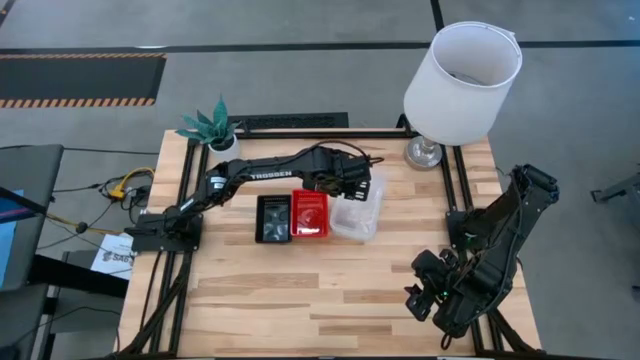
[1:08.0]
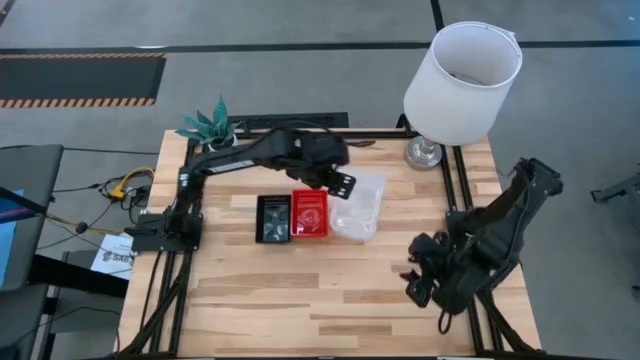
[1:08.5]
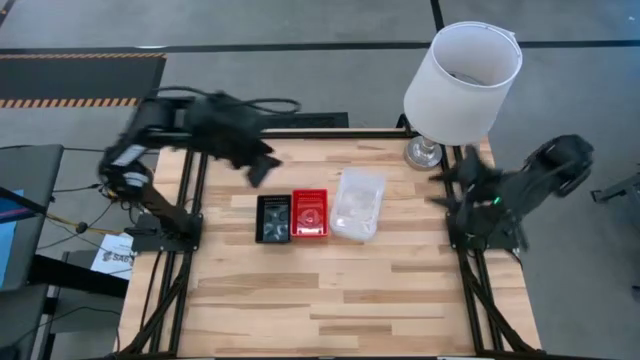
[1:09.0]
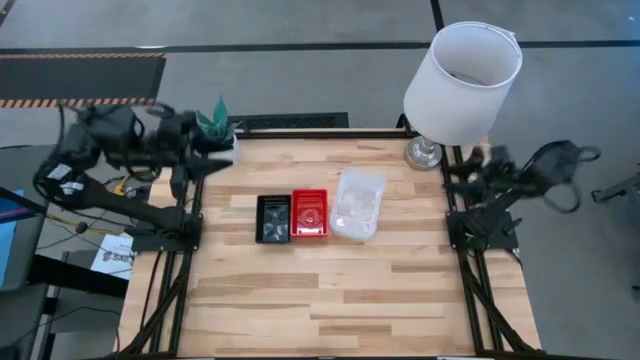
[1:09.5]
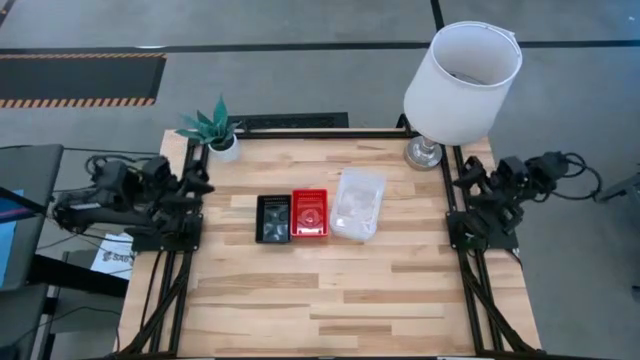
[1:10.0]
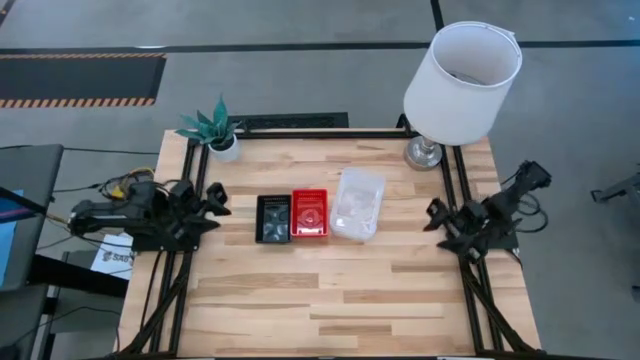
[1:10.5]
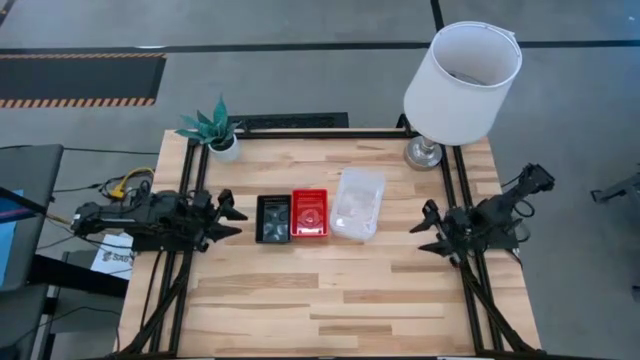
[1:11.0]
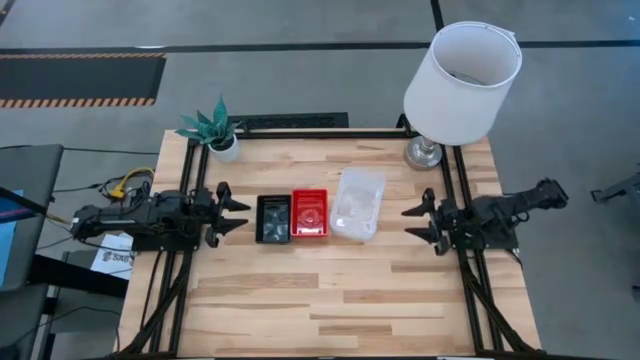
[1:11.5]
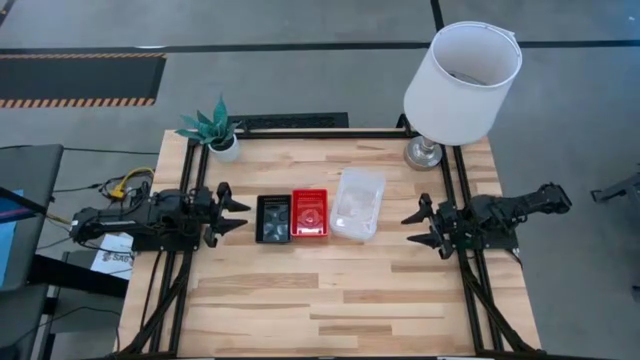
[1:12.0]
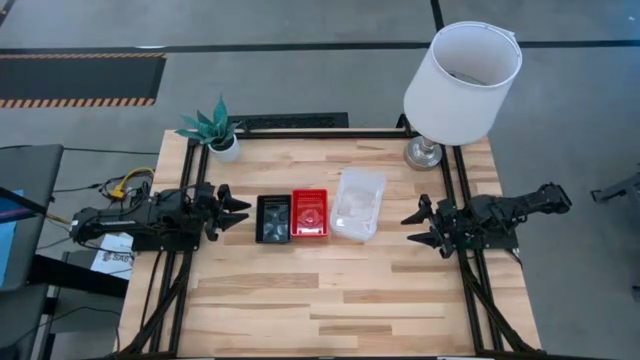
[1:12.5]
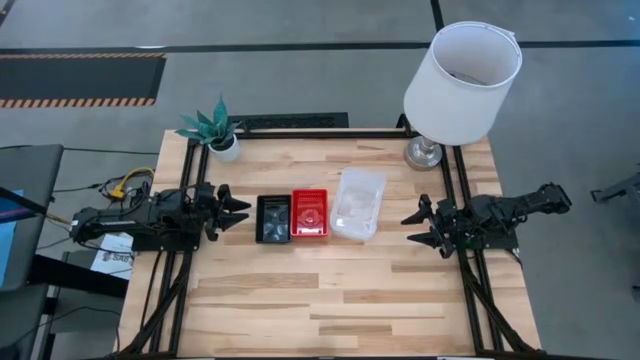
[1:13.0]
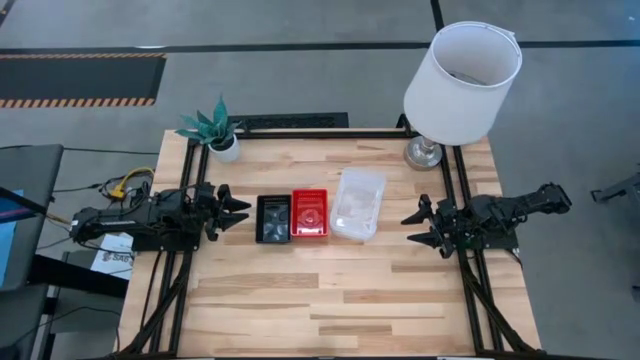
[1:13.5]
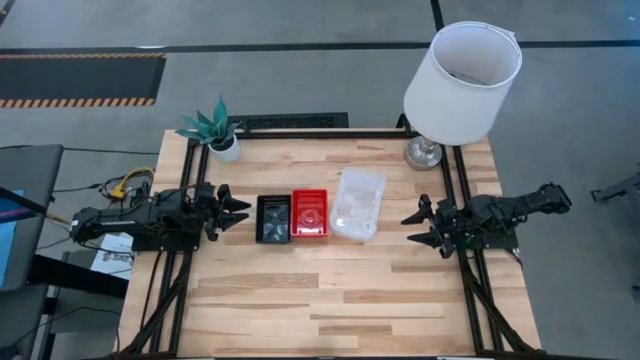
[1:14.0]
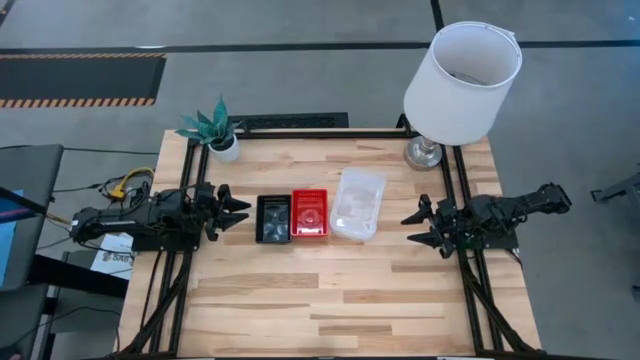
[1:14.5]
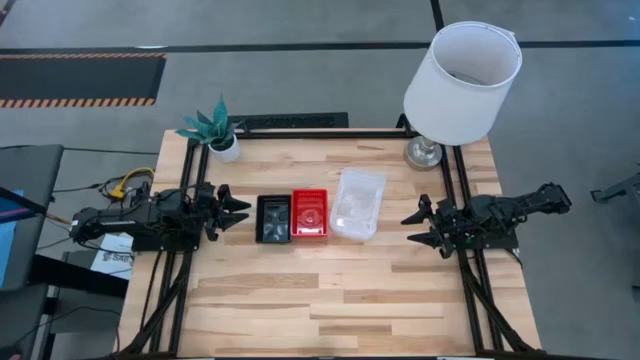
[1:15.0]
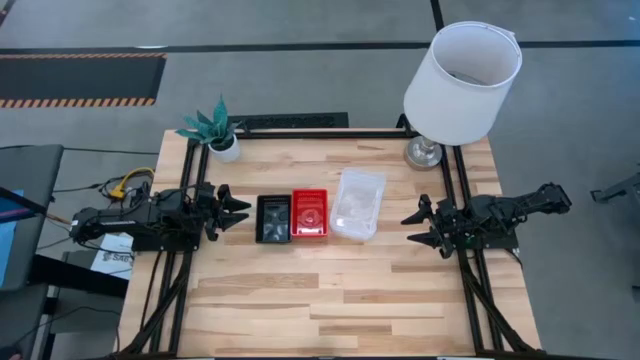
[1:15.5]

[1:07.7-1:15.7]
Return to Home Position
